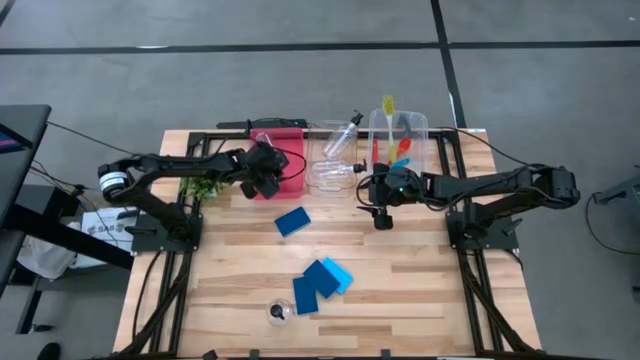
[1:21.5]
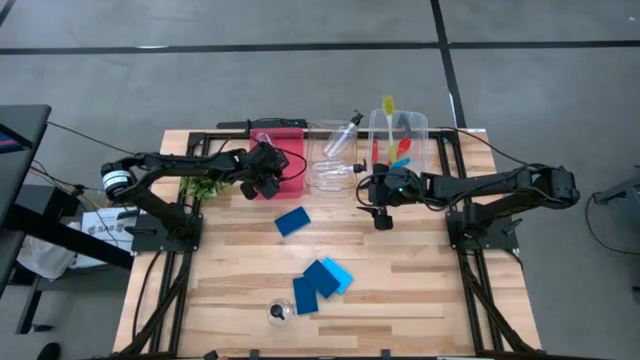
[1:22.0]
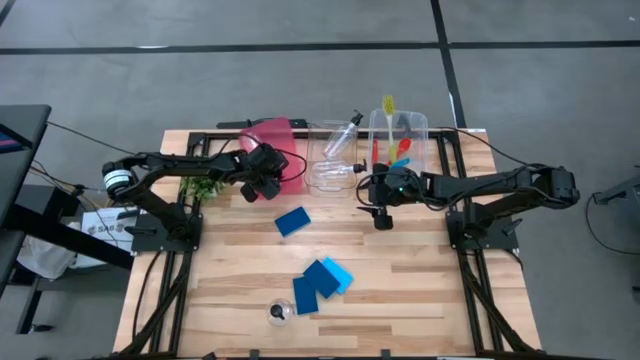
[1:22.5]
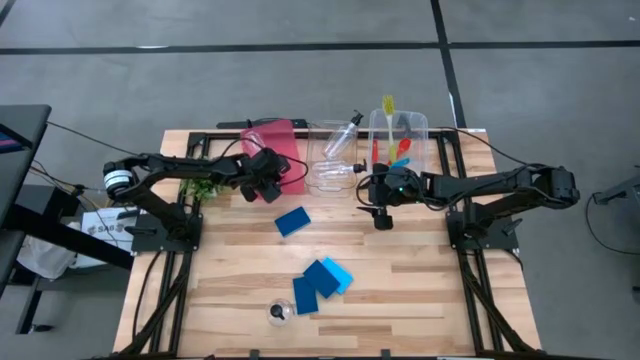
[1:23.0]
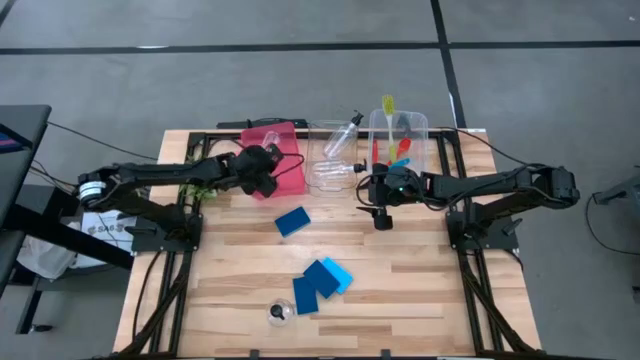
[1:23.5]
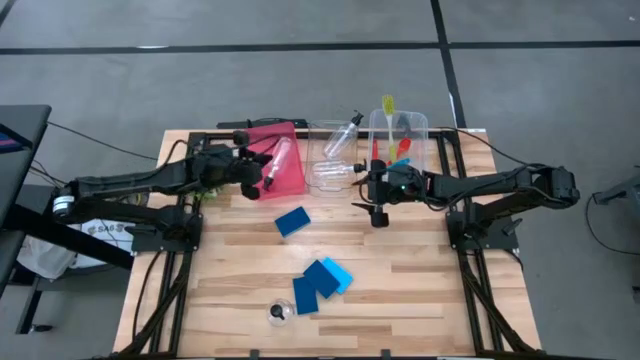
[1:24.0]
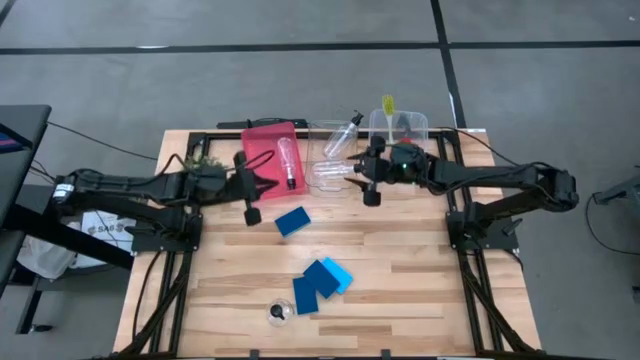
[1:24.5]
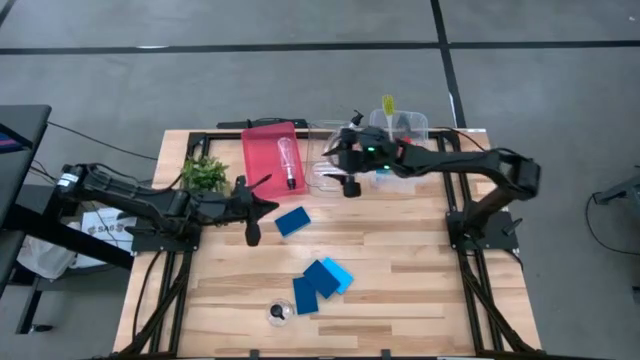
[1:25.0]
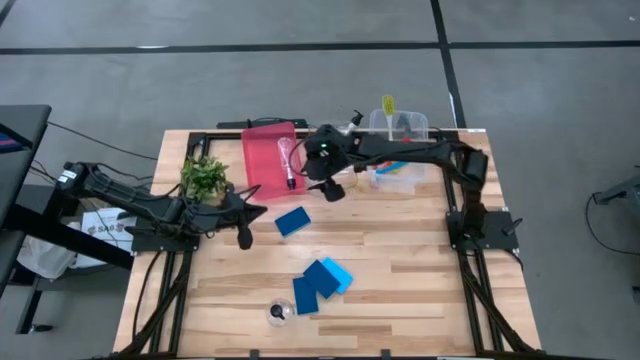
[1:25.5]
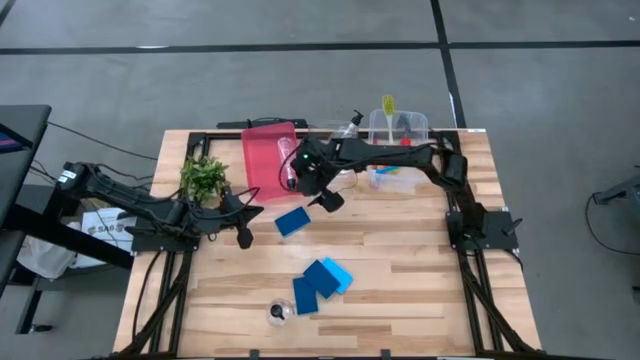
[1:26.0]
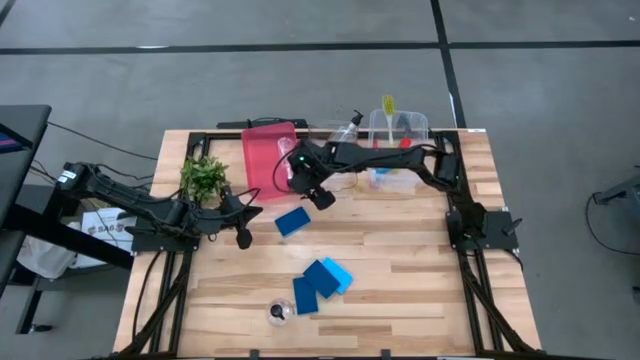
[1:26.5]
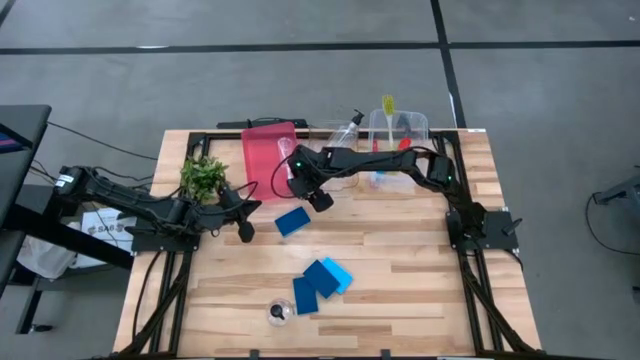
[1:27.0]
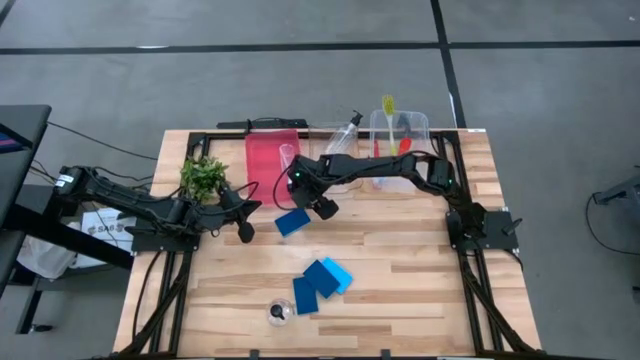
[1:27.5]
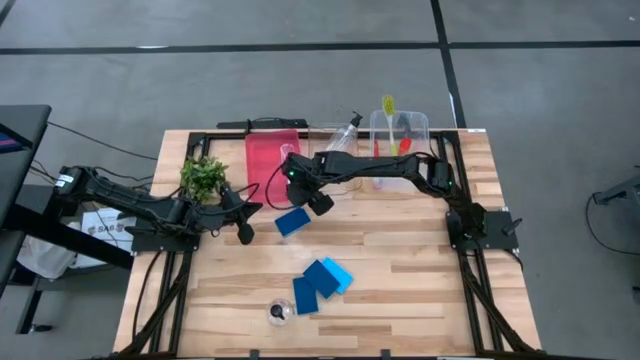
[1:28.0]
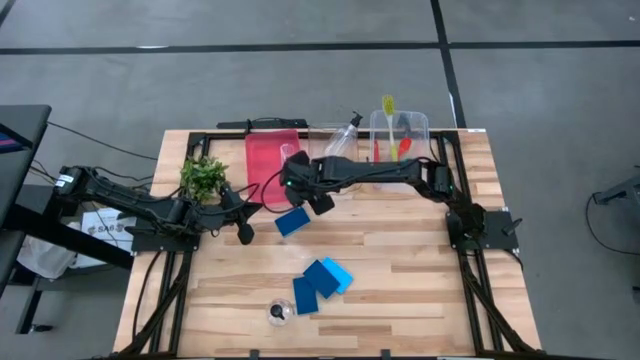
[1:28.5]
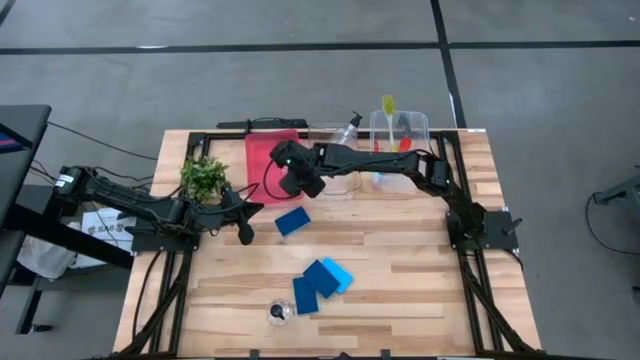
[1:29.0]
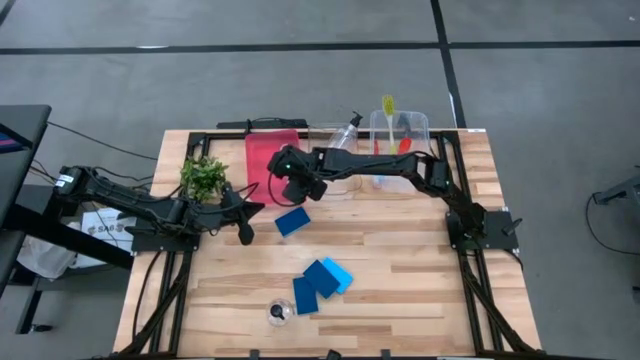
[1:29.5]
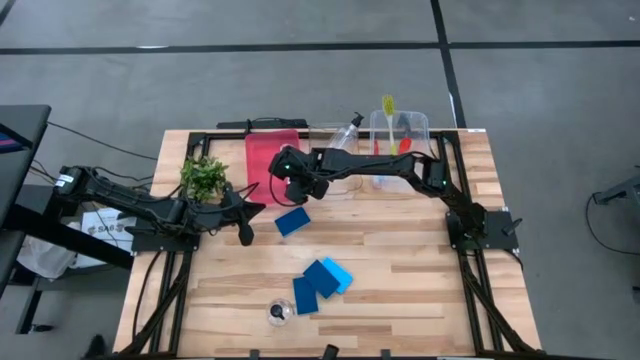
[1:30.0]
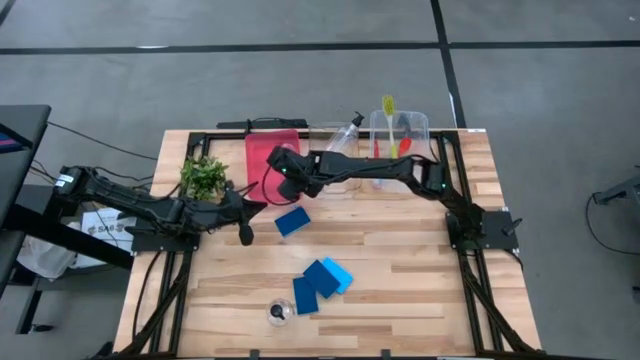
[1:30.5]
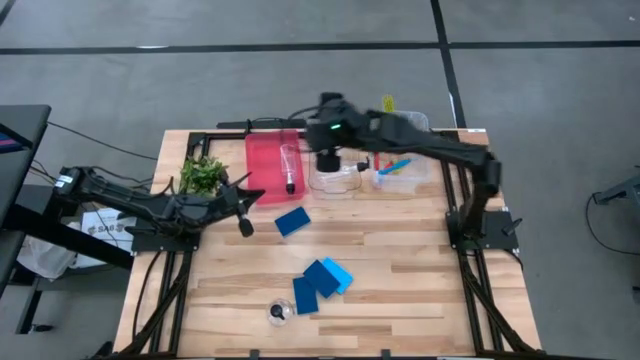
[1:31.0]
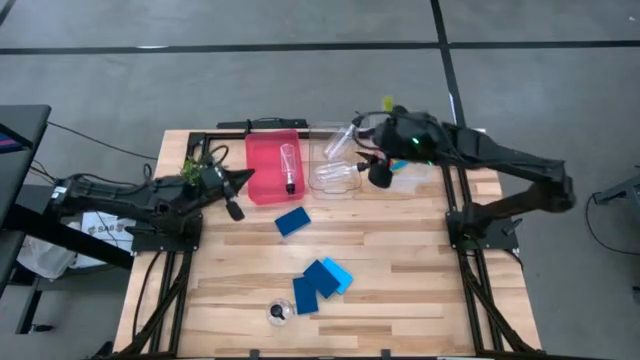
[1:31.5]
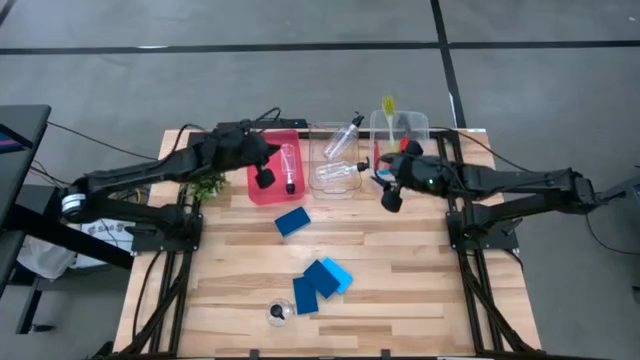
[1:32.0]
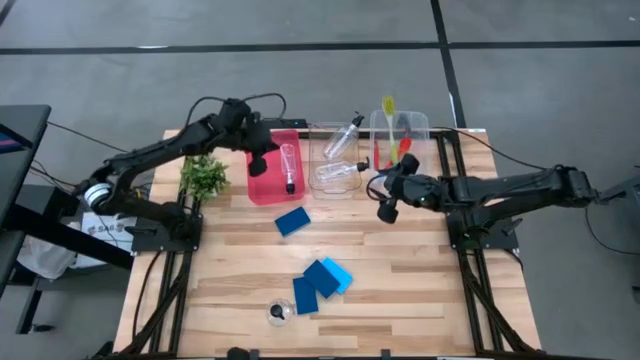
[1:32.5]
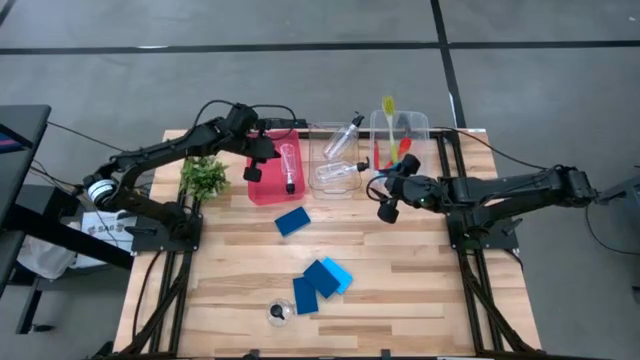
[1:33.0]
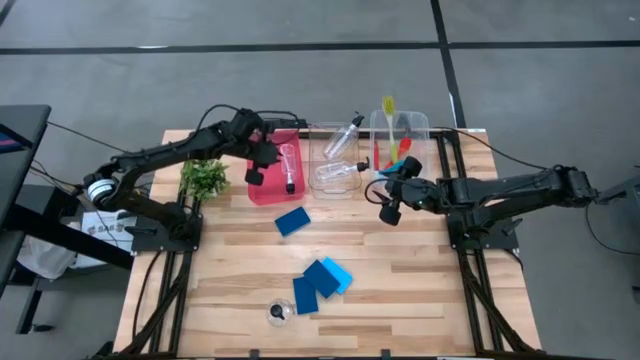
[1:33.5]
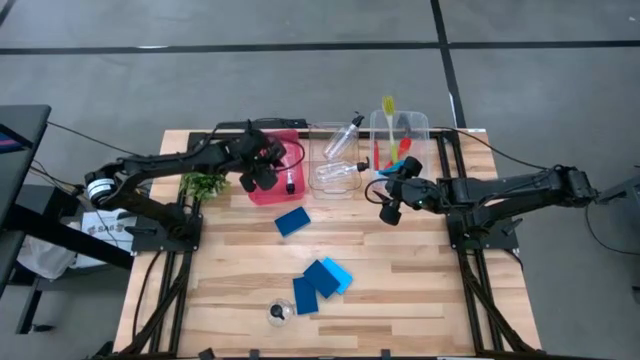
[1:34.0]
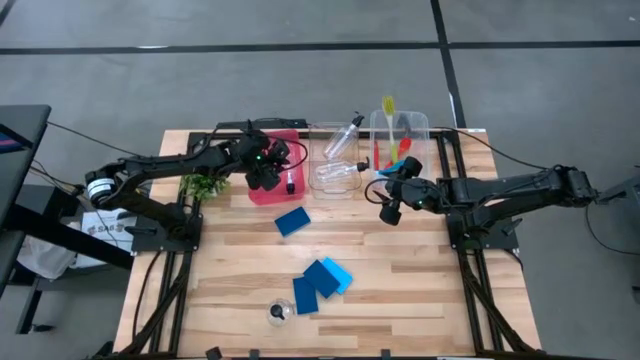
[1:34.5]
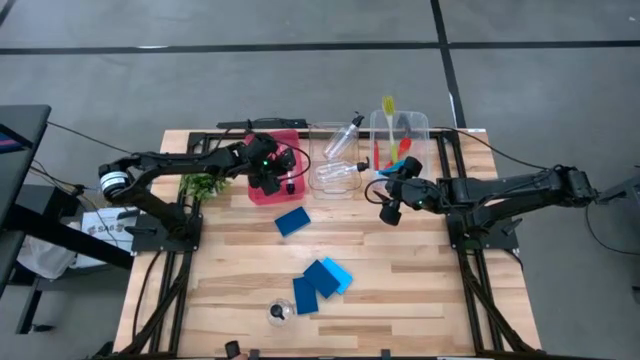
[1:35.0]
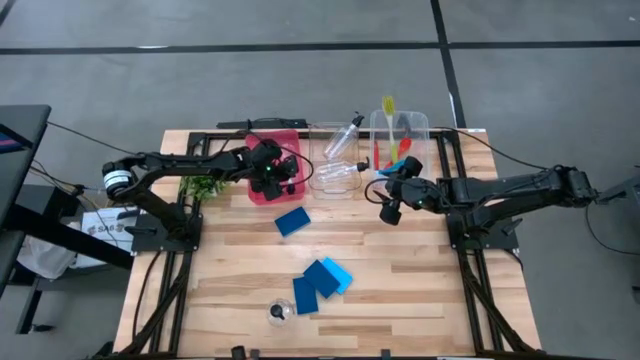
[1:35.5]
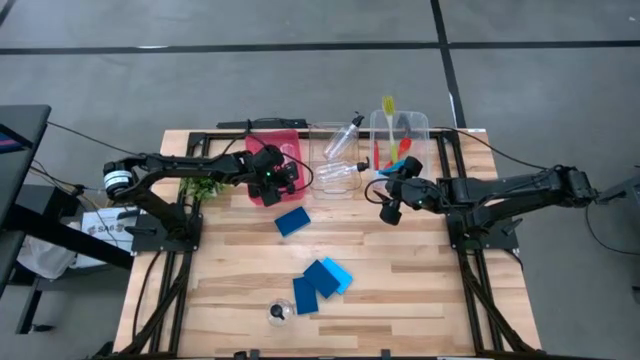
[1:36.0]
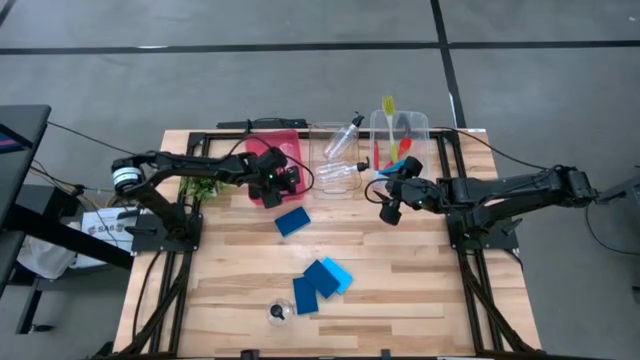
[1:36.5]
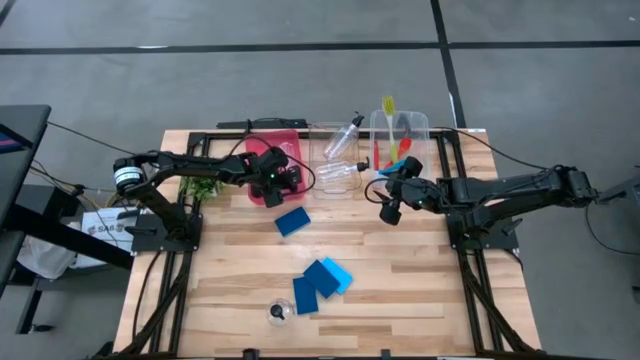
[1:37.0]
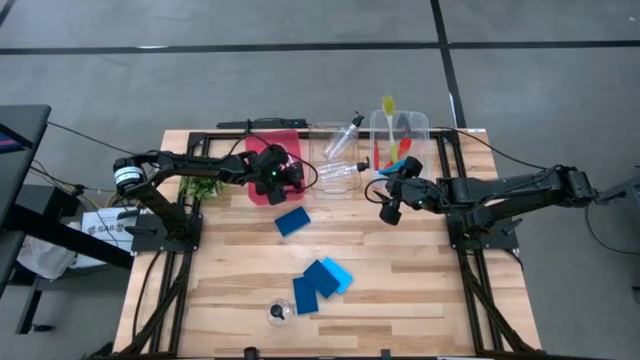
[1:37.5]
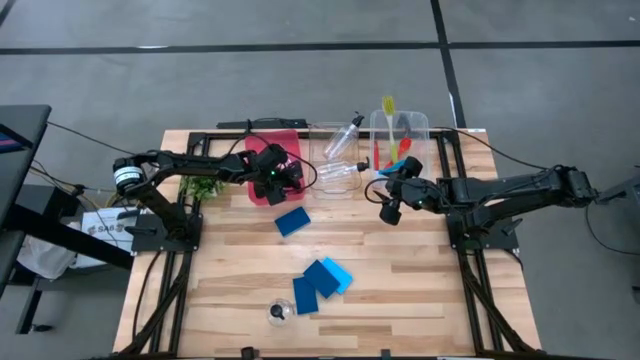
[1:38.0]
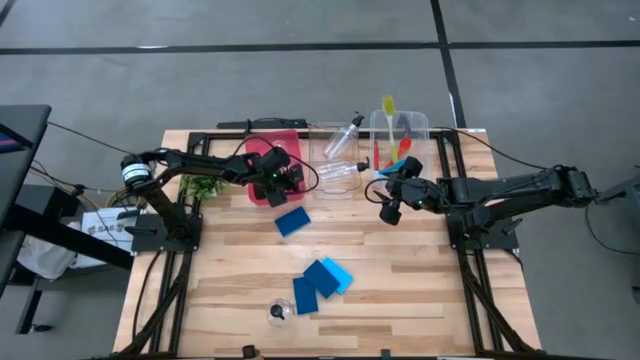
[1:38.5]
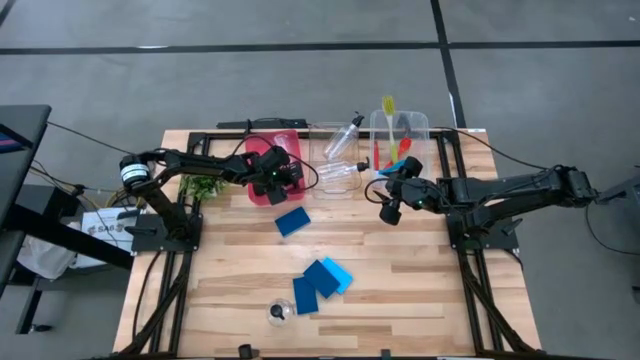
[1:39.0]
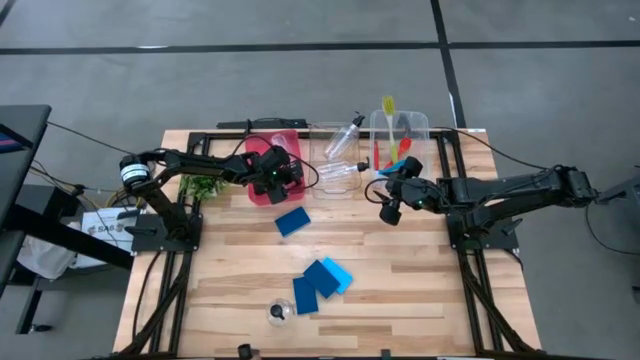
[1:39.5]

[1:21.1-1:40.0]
Task: Pick & Place Kitchen Sink Supplies
Put the soap dispenser into the left transparent bin
